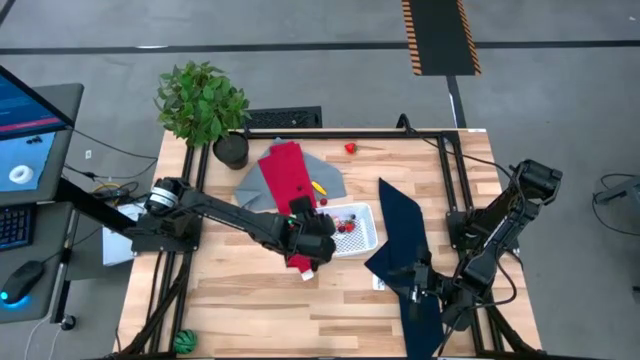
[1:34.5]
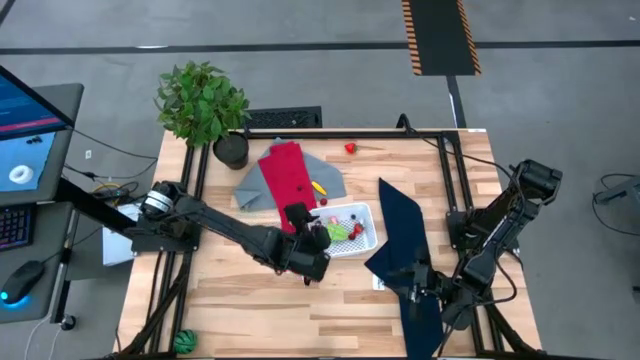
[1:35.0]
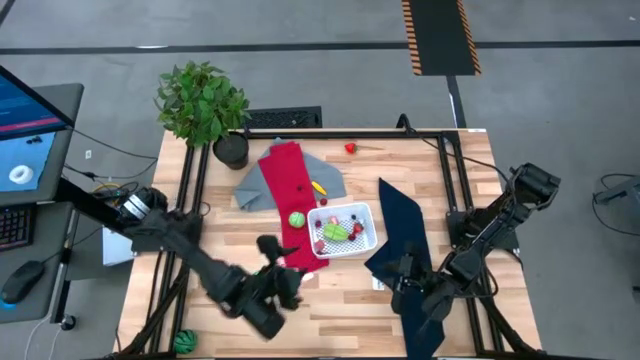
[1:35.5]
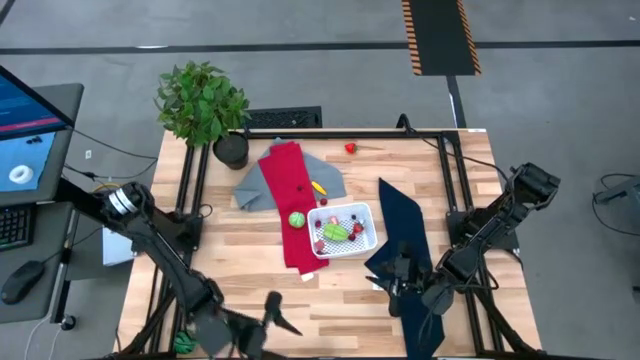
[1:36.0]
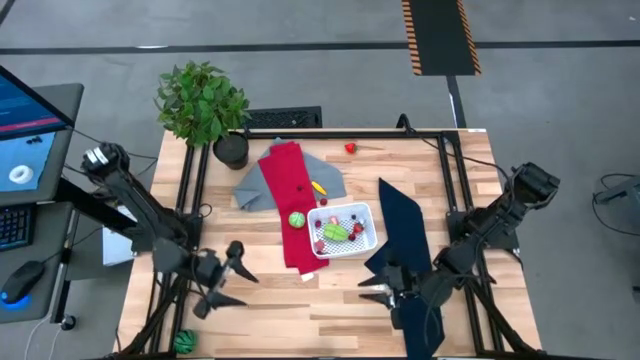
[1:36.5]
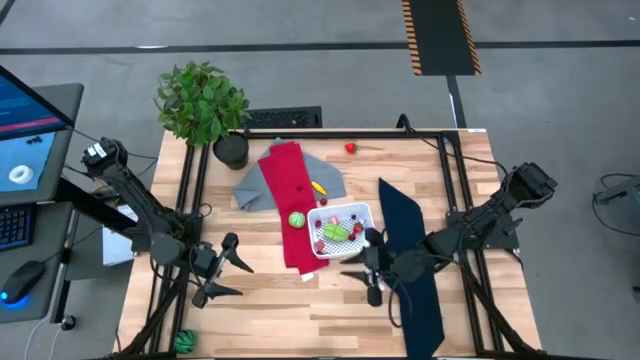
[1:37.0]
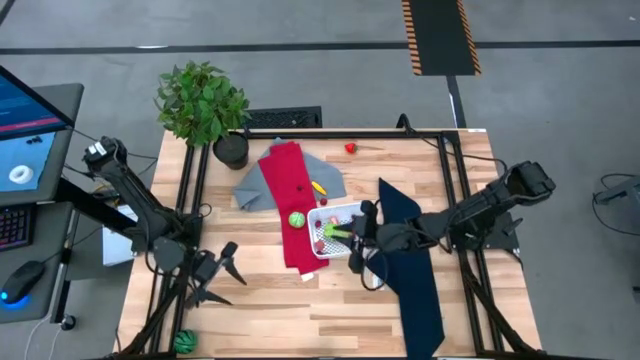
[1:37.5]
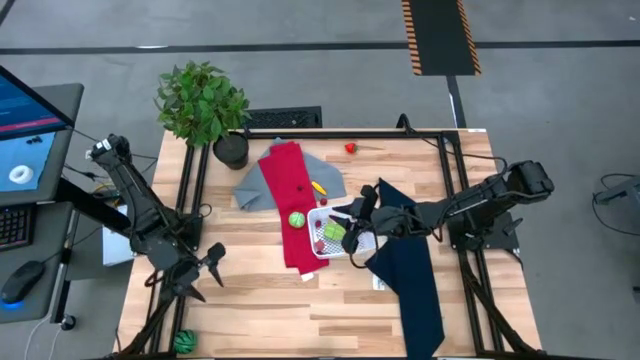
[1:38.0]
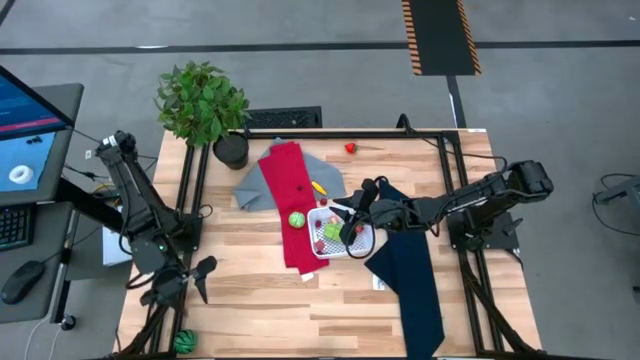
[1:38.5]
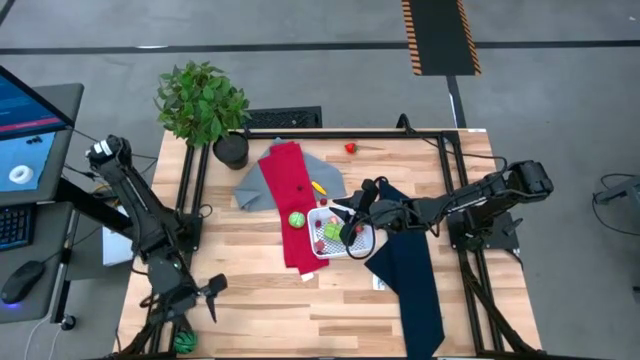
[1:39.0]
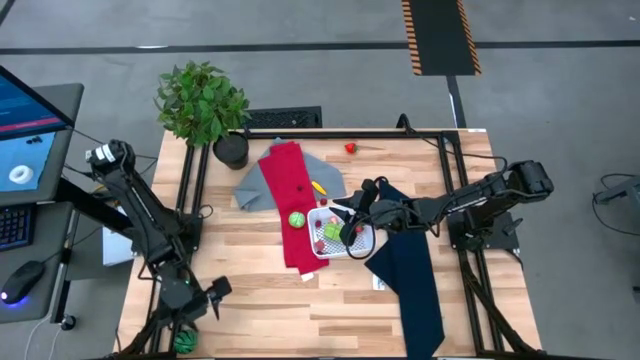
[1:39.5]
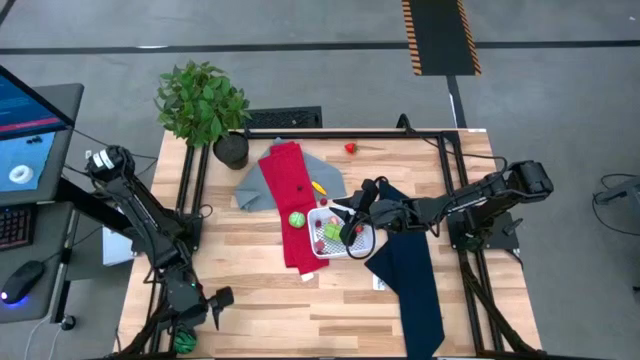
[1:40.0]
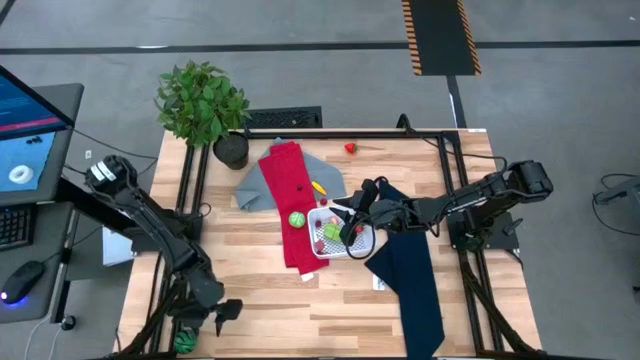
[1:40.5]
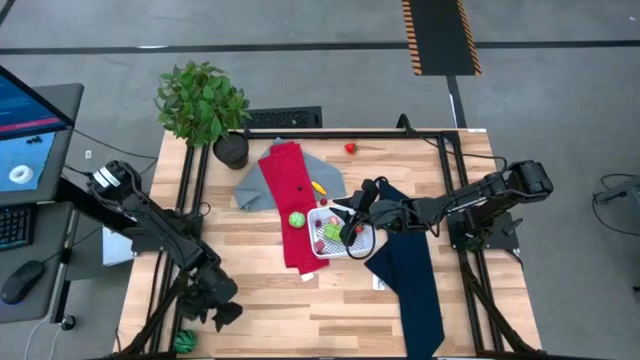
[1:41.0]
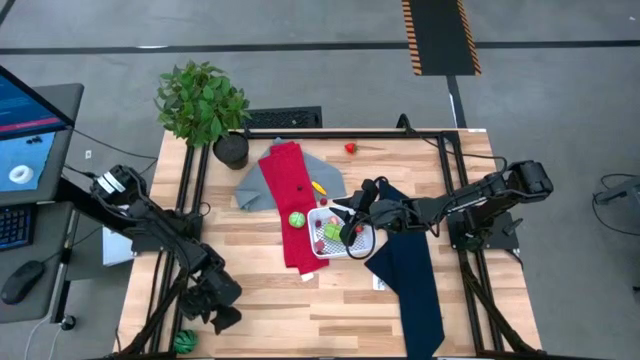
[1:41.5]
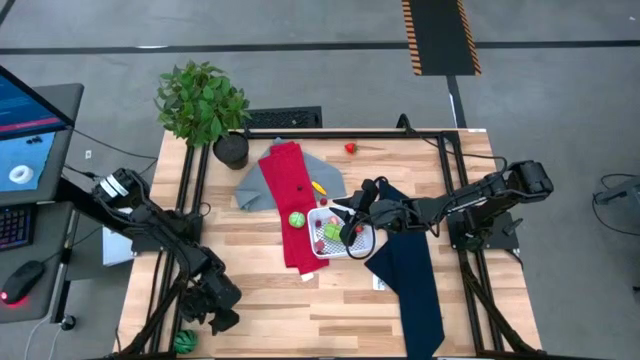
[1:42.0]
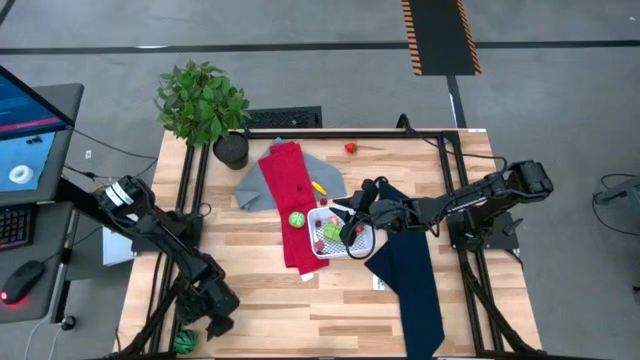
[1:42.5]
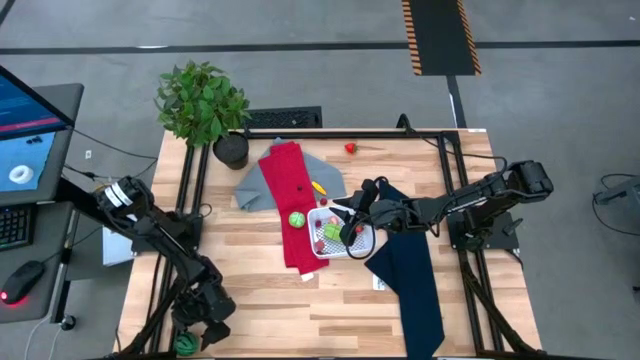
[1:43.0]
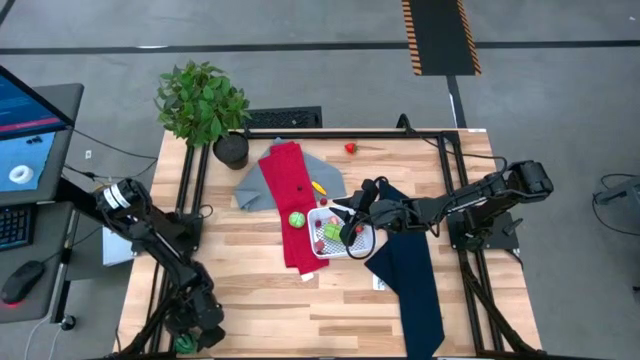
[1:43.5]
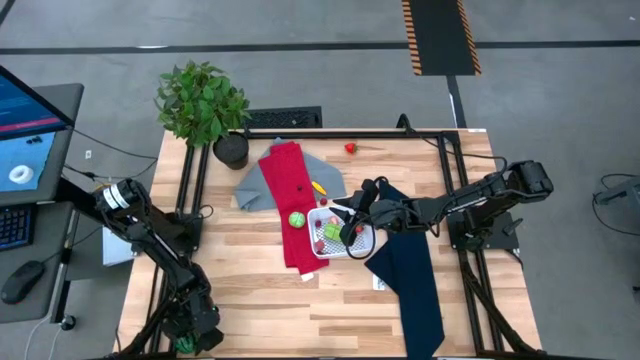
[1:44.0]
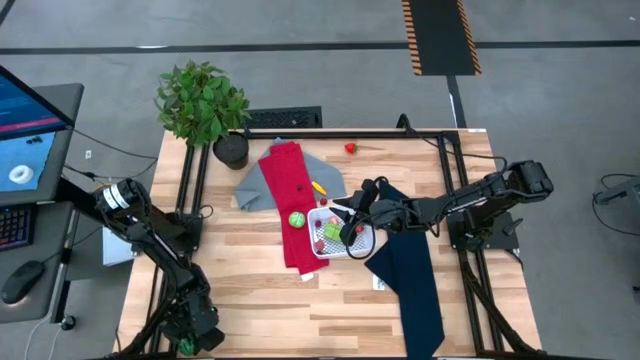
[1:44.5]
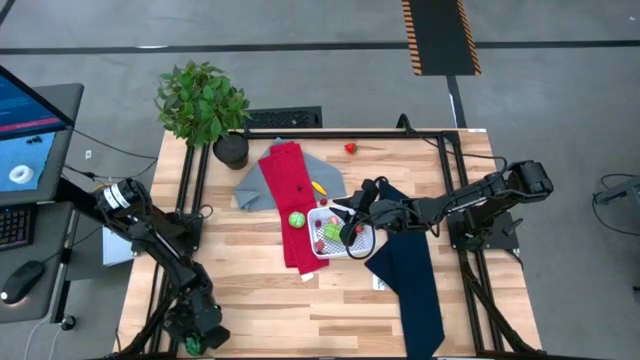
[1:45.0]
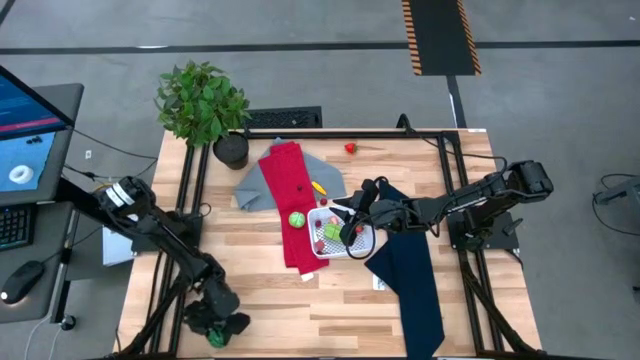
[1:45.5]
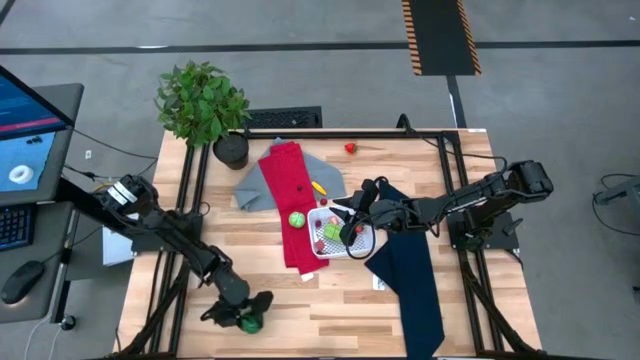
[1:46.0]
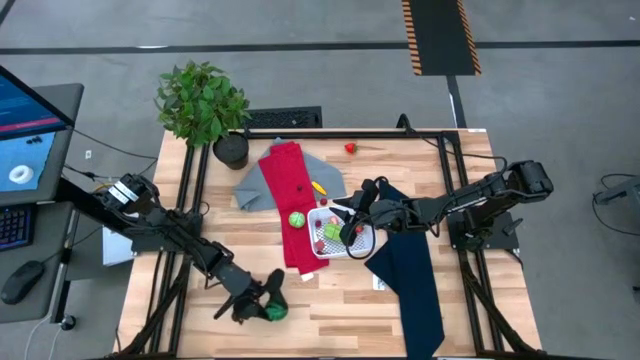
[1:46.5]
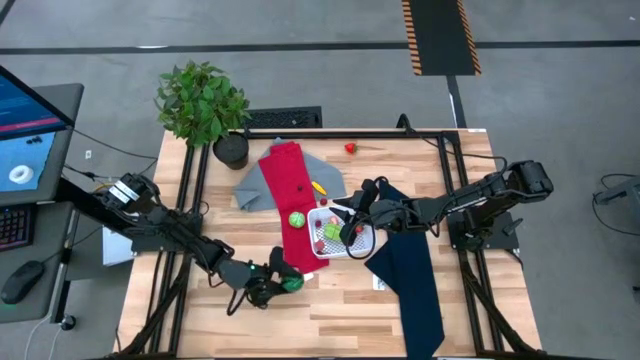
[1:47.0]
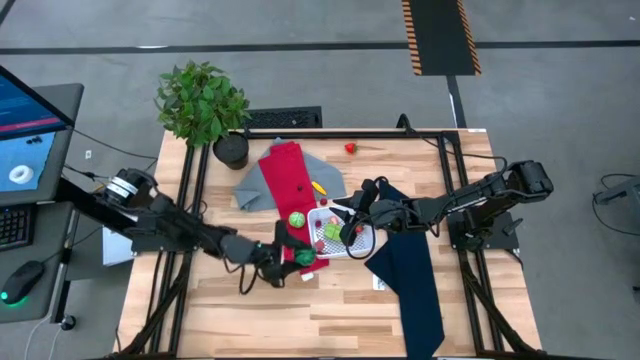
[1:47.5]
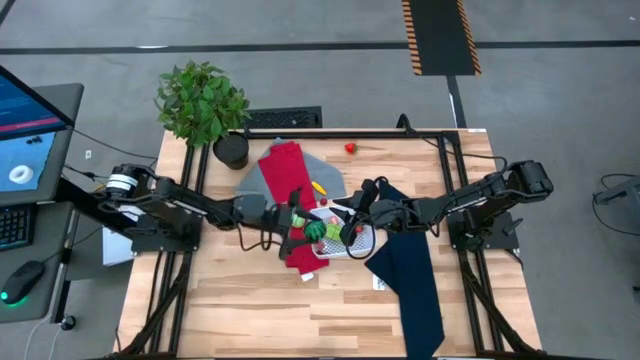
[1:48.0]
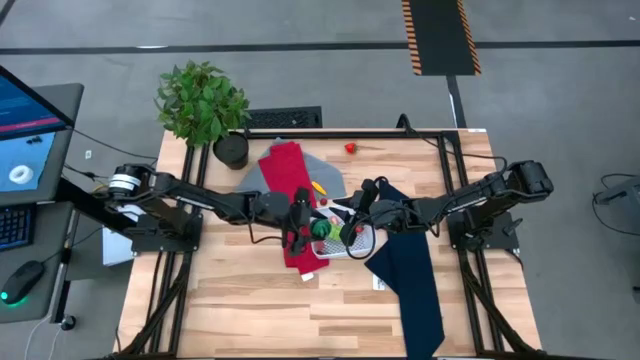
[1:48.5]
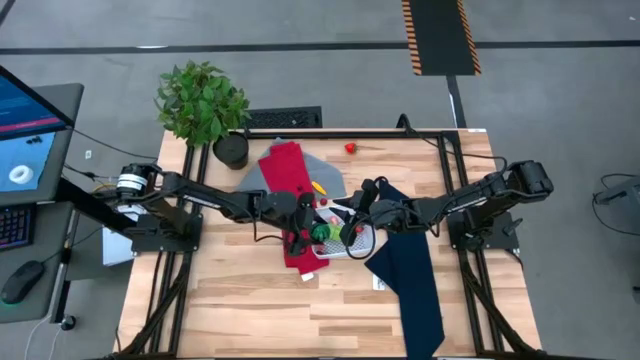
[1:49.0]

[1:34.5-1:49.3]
Task: Pick and placing Produce into tupperware
Put the watermelon into the white bin

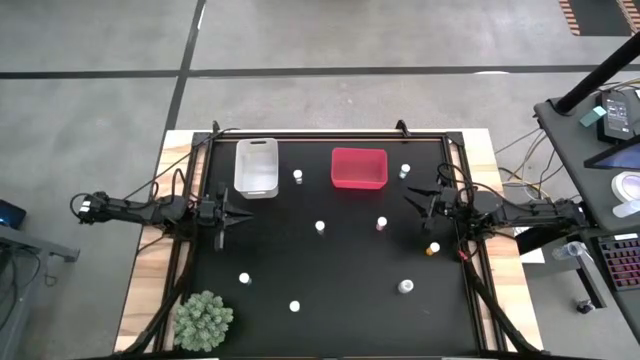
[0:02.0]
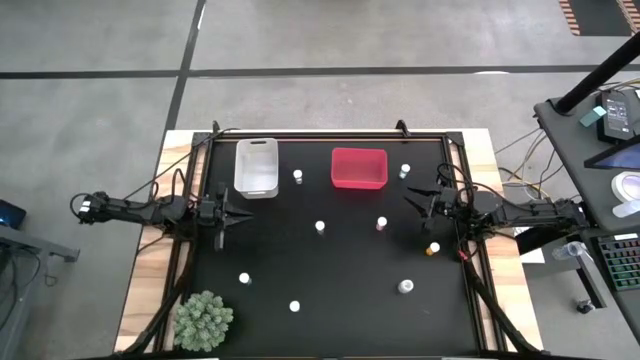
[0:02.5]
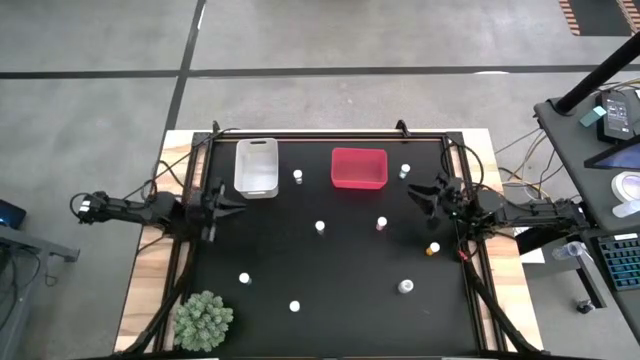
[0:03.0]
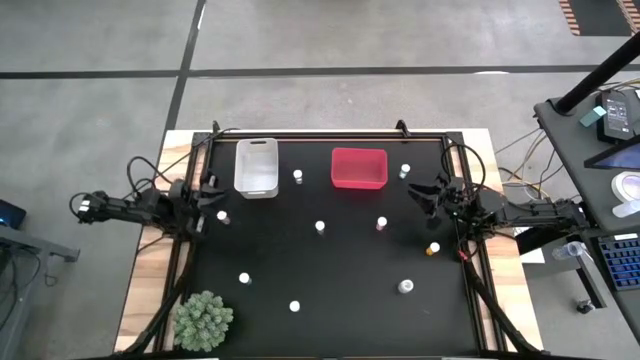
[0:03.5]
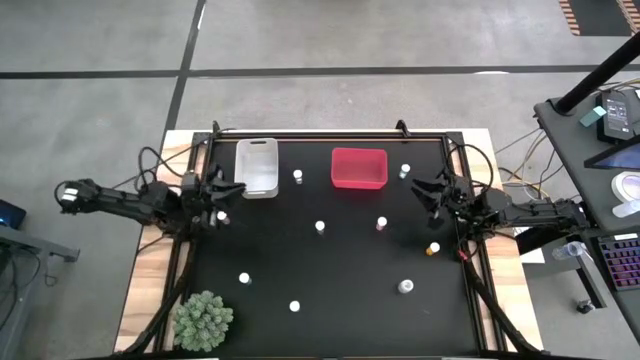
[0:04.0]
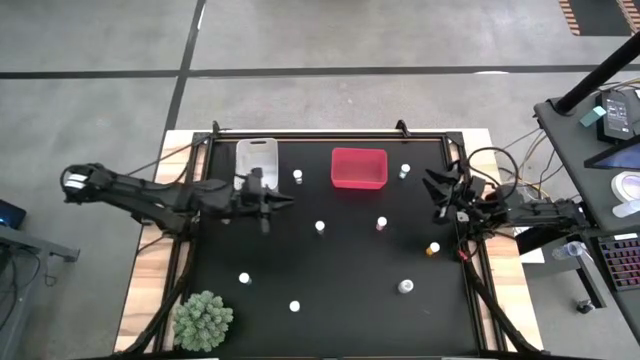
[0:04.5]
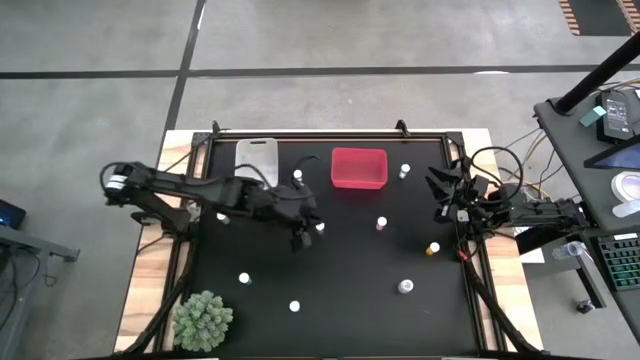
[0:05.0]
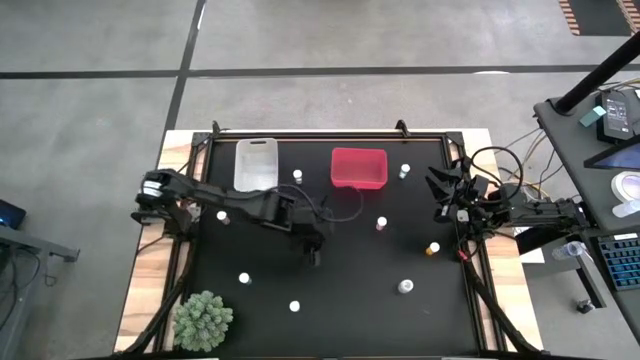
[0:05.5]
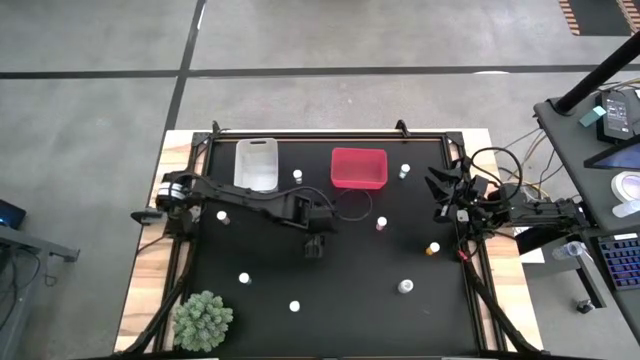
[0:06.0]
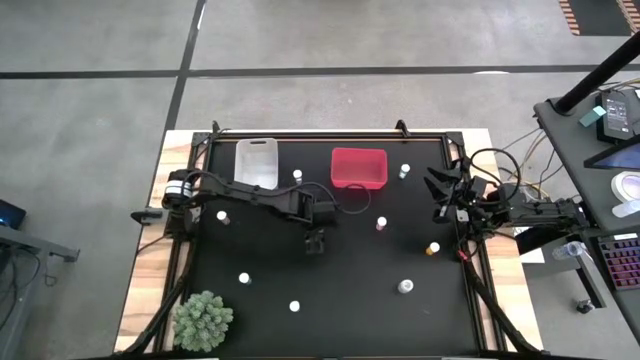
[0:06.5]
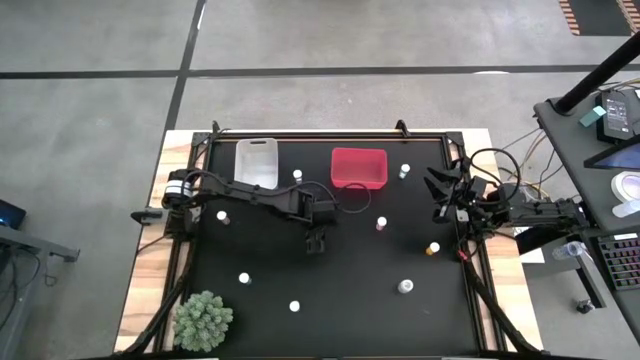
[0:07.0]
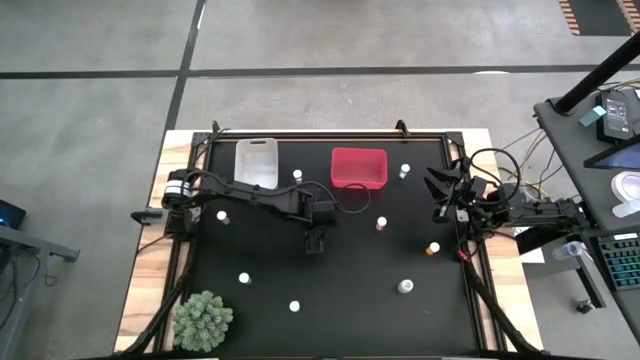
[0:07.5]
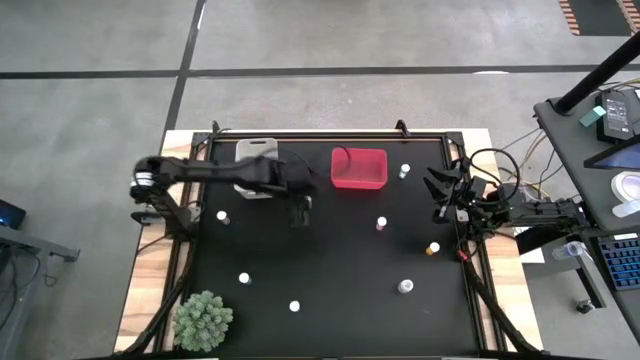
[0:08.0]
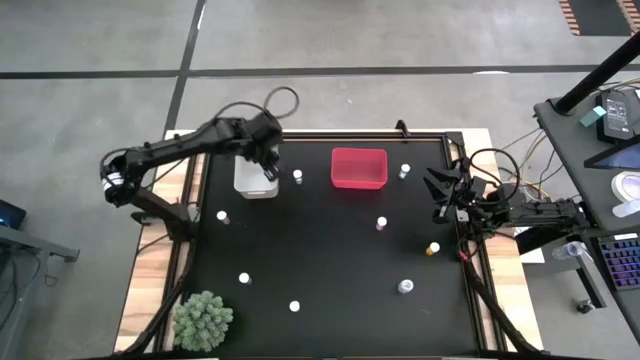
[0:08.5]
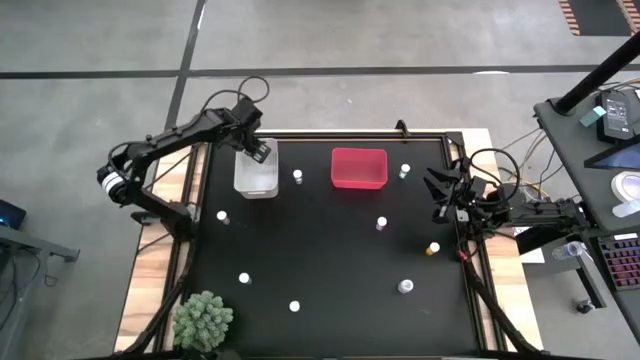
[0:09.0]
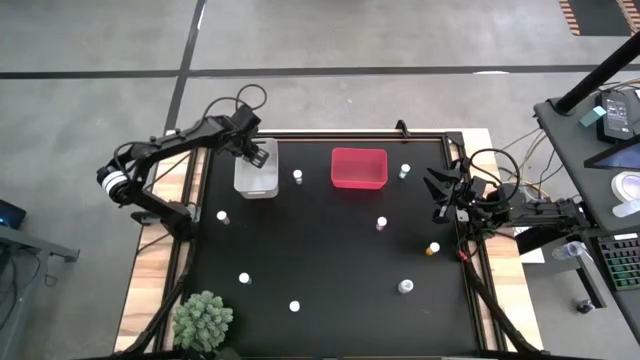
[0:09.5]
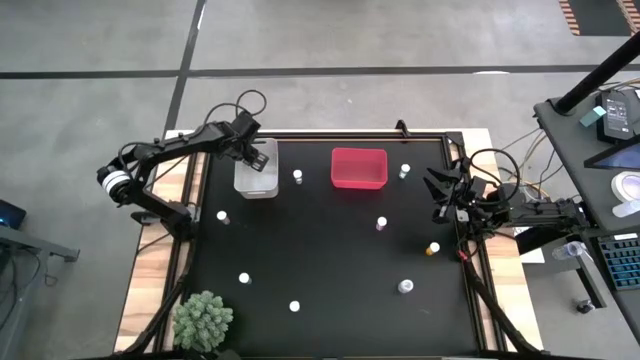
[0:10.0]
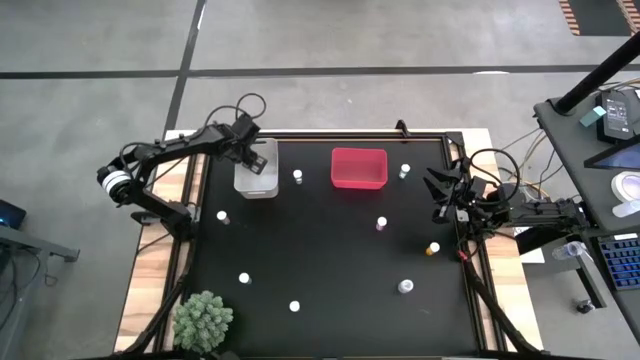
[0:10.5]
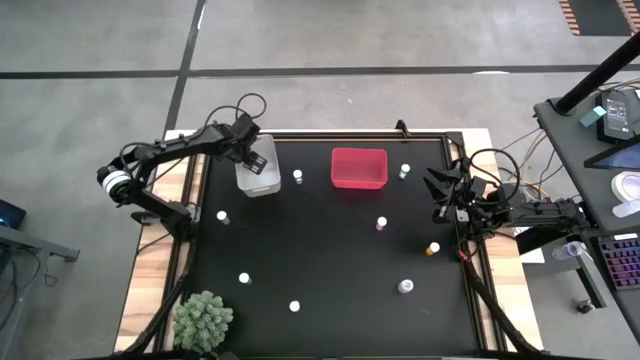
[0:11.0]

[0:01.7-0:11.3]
Task: Pick and place medicine bottles into bin by pill shape (circle, oval)
Put the blue capsule bottle into the gray bin
